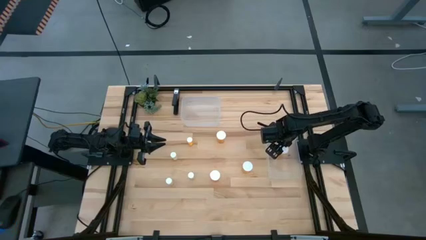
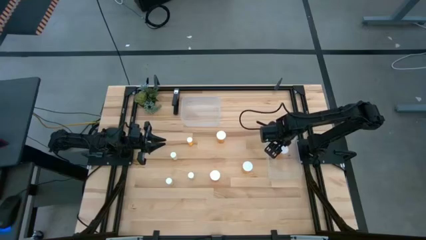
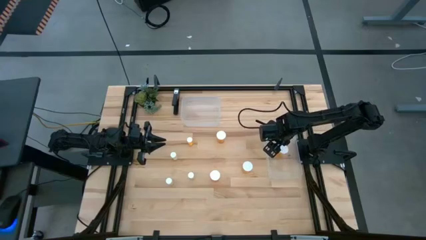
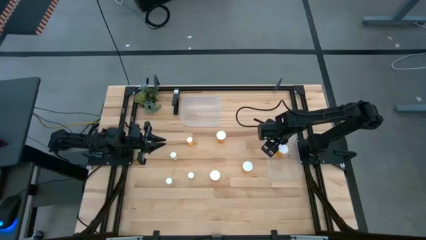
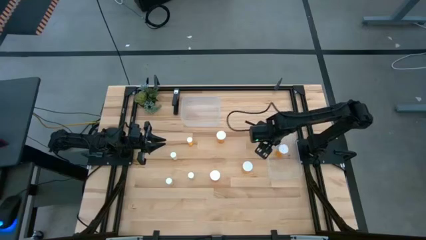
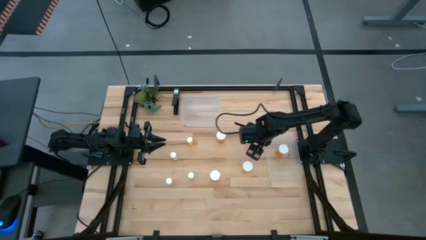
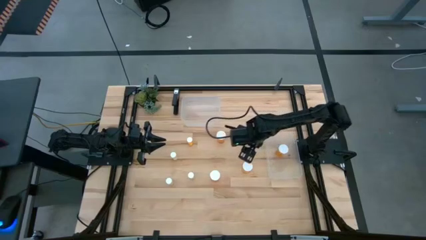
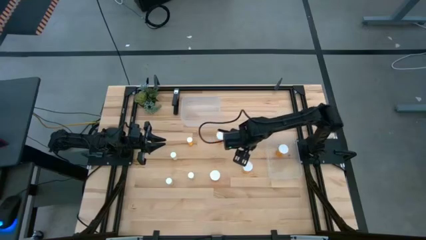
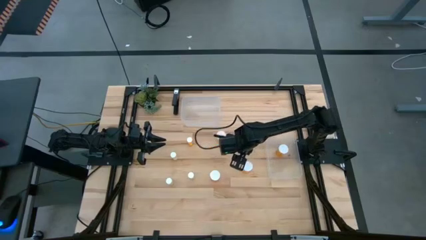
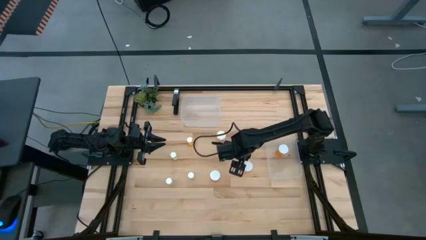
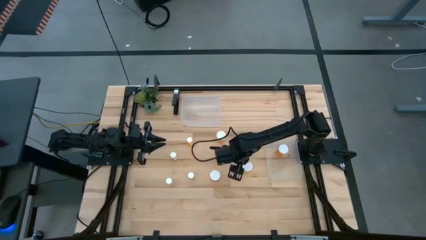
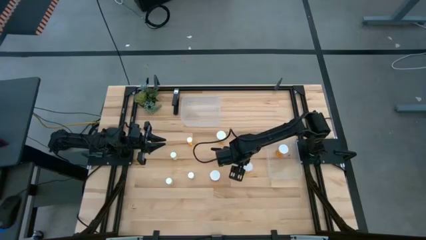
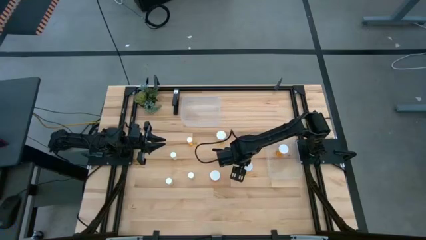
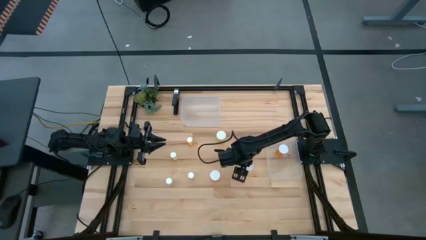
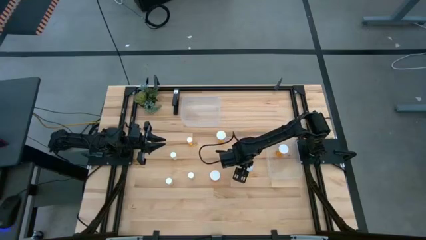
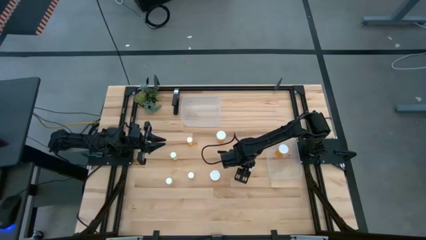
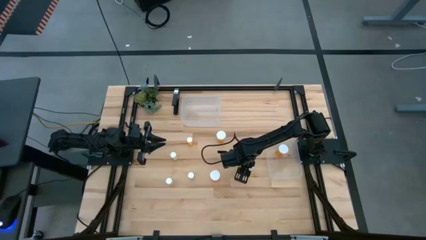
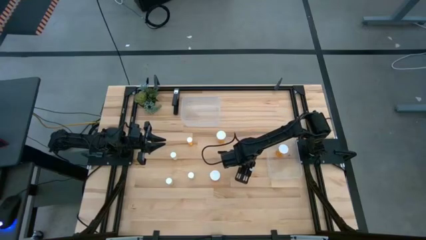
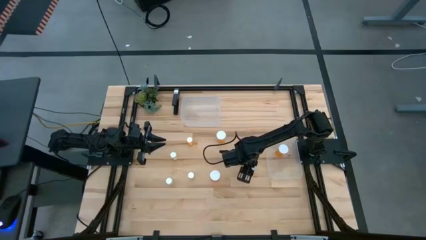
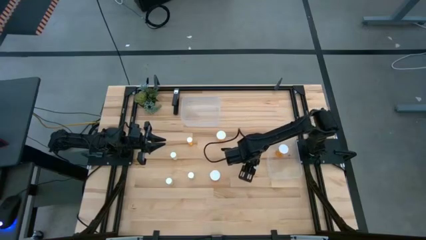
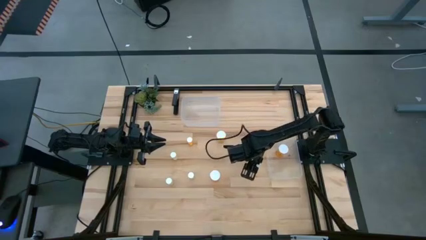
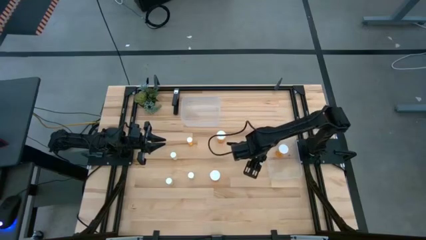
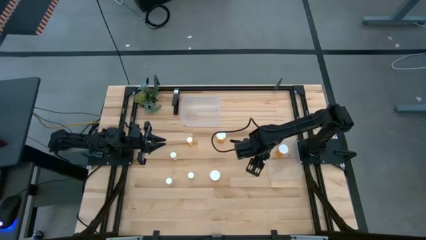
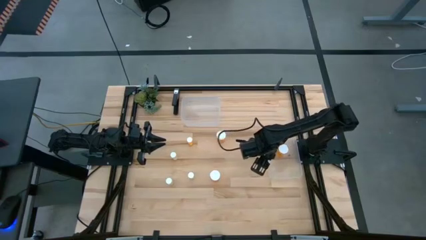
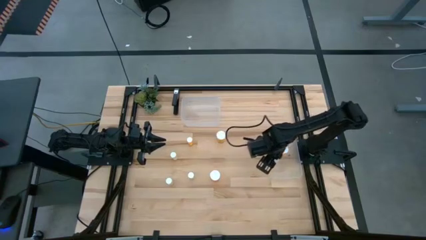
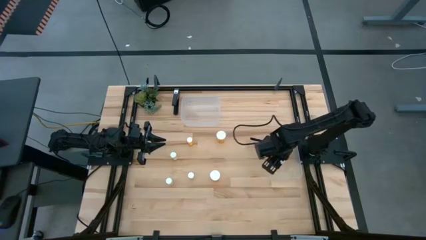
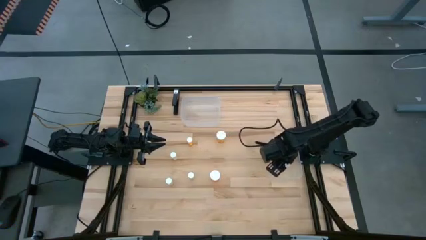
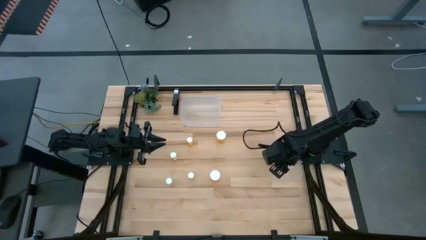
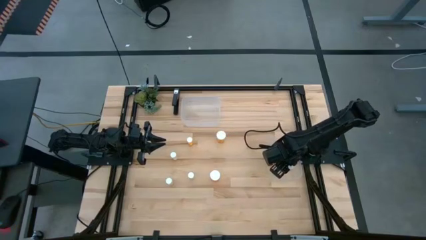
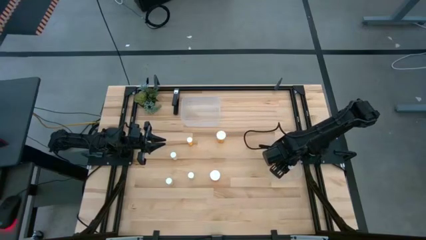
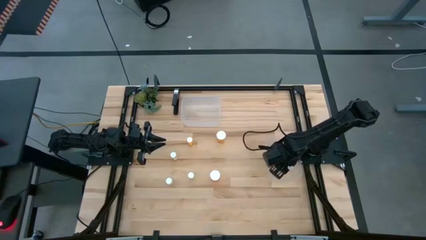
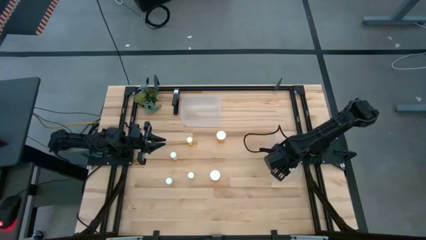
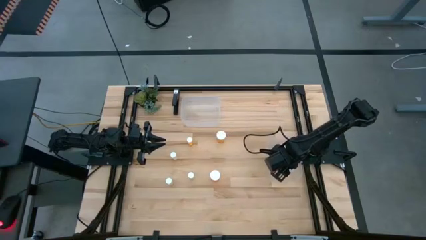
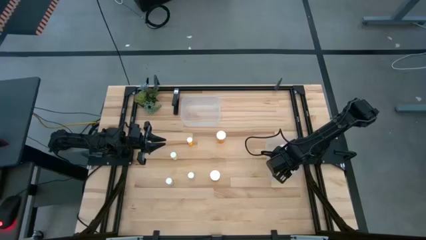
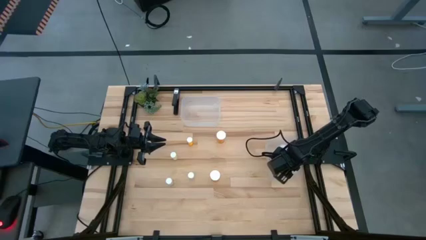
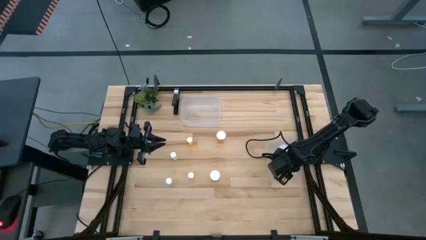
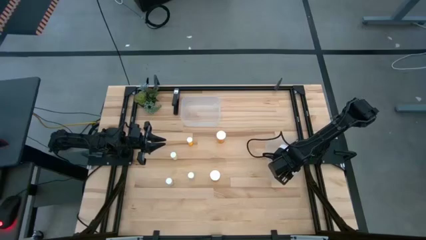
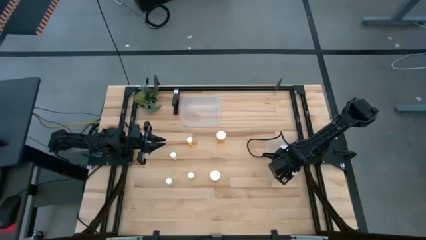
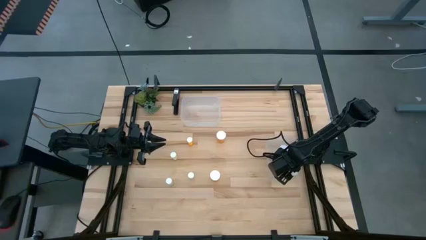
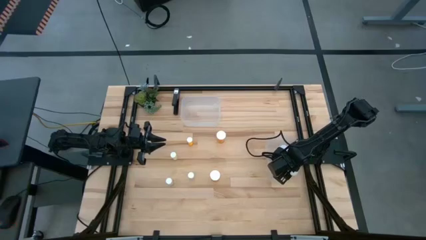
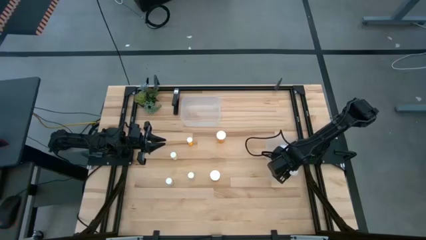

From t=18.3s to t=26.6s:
Task: Pick and place medicine bottles into bin by pill shape (circle, oval)
Put the large orange pill bottle into the bottom transparent bin

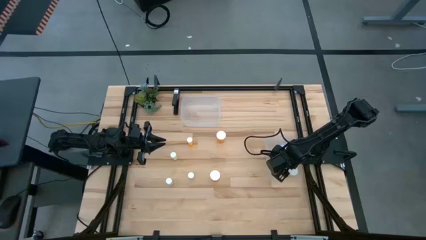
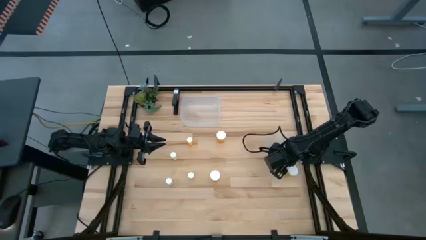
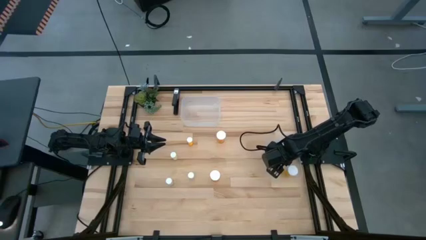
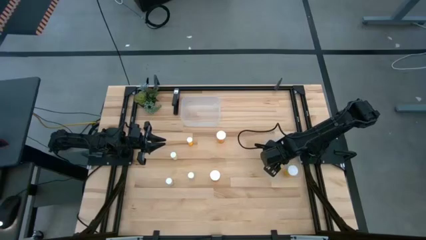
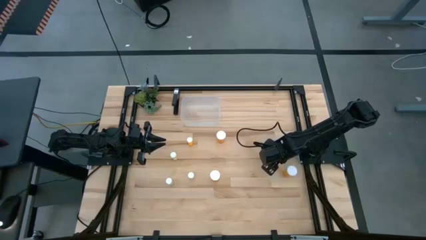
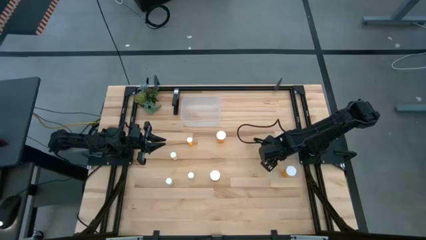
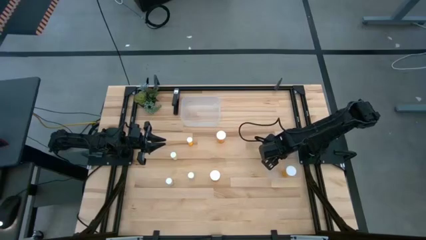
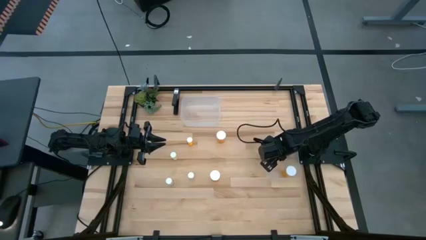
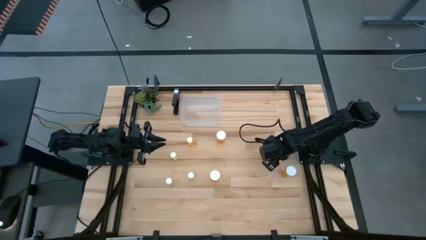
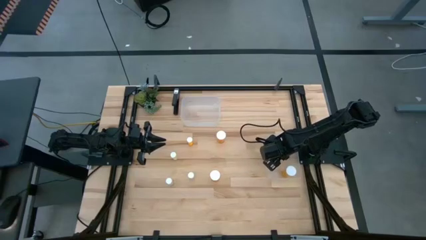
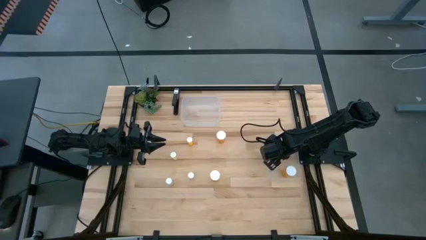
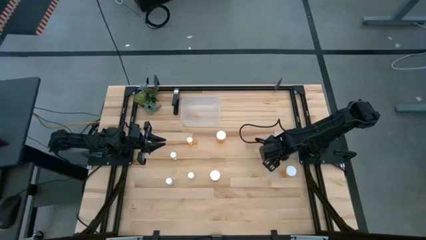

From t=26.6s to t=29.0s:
Adjust the large orange pill bottle in the bottom transparent bin

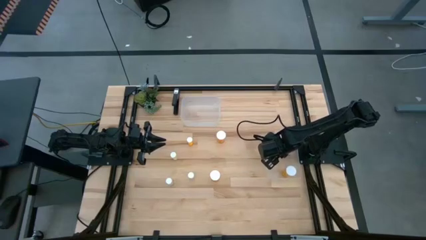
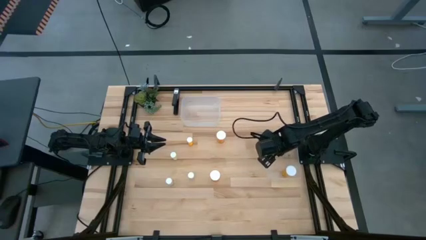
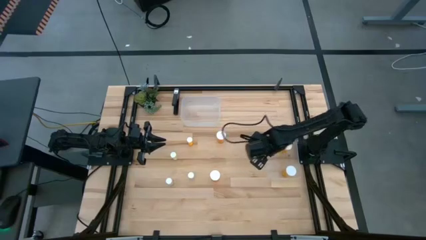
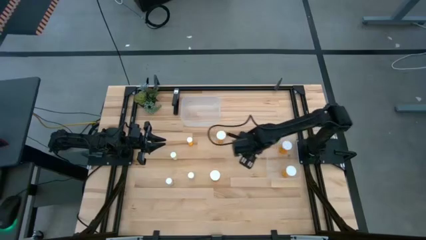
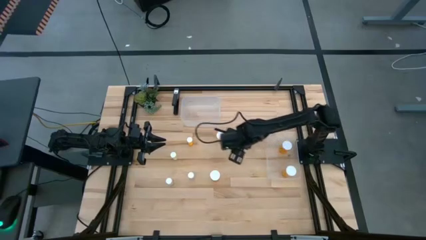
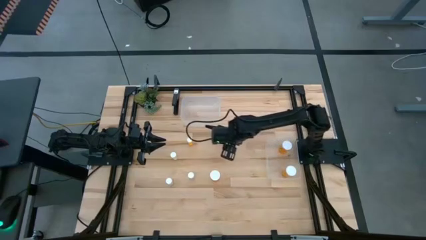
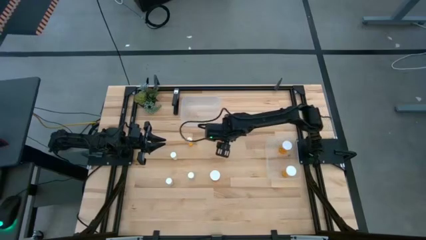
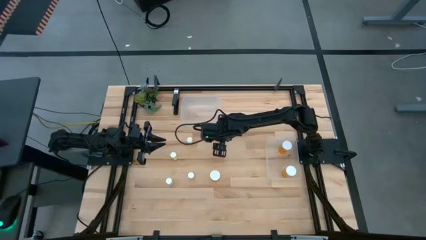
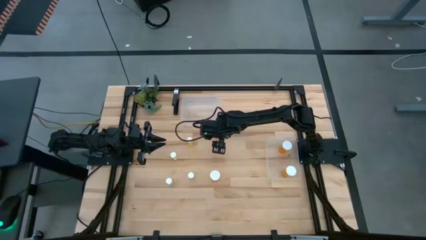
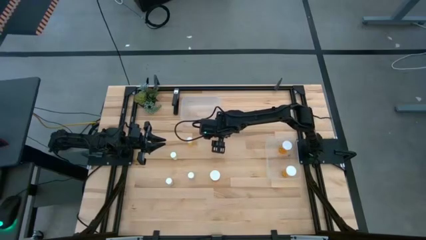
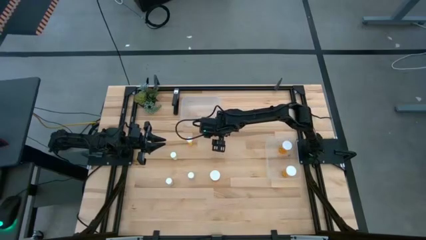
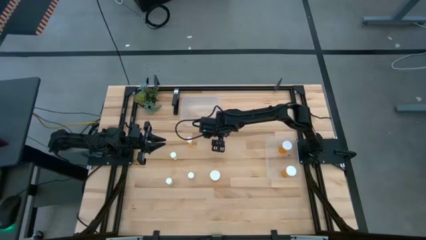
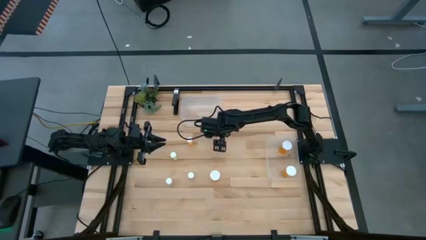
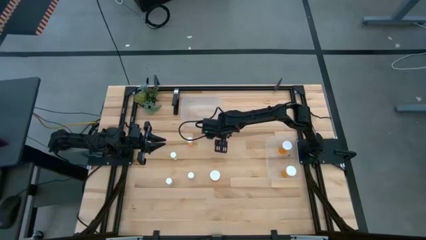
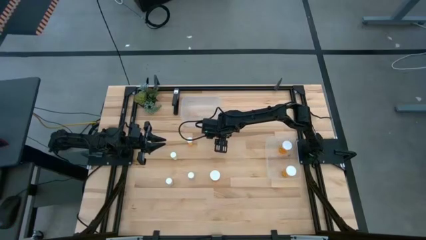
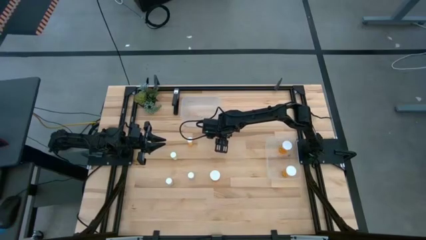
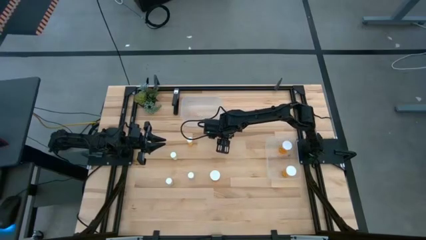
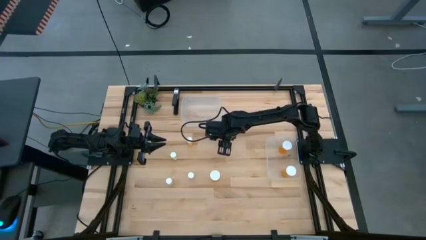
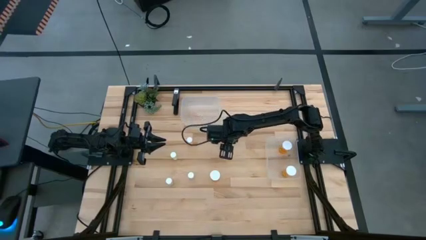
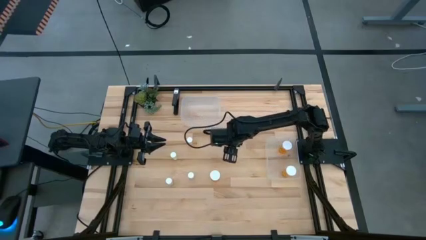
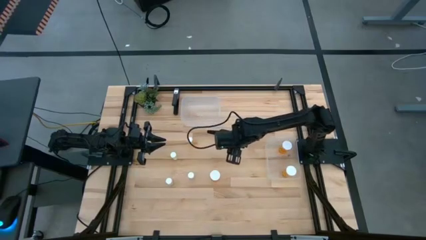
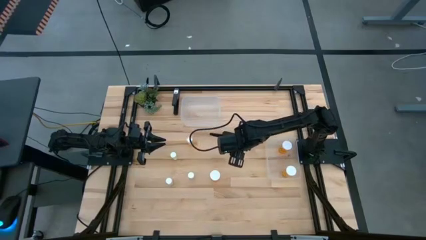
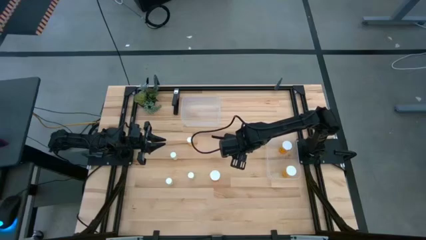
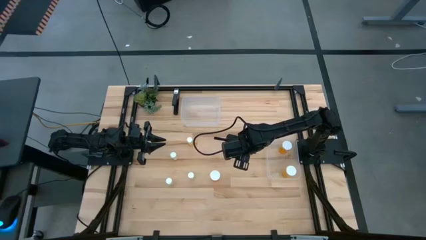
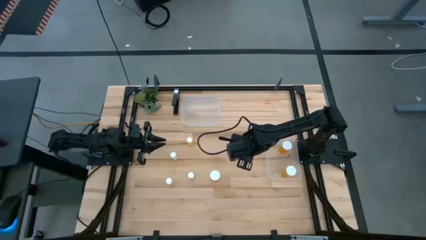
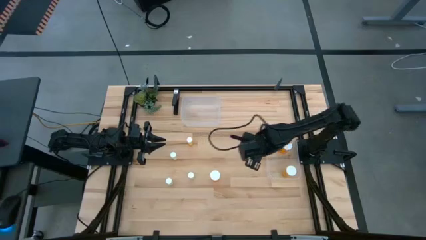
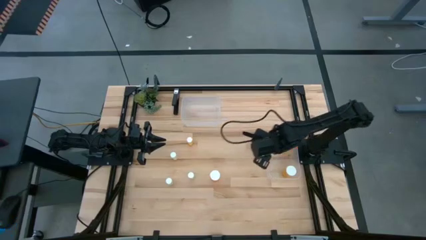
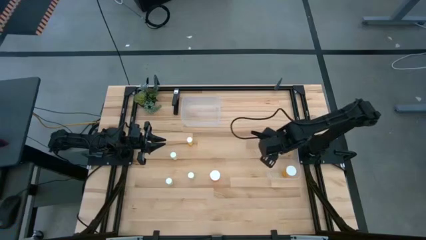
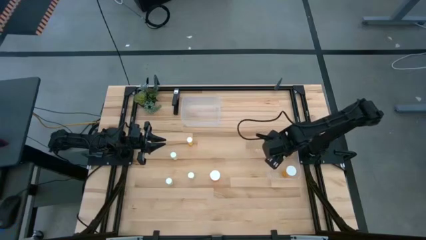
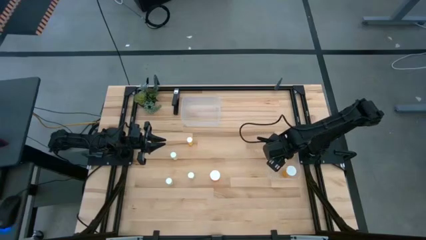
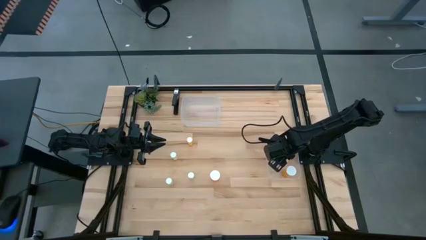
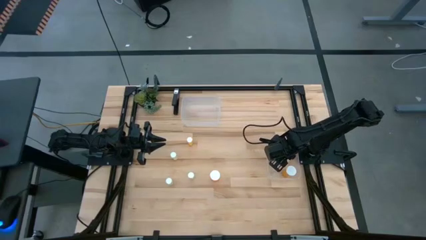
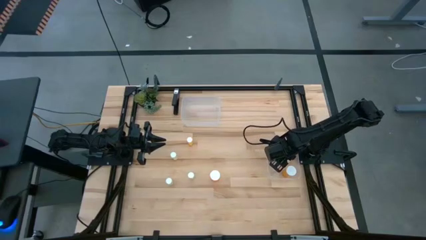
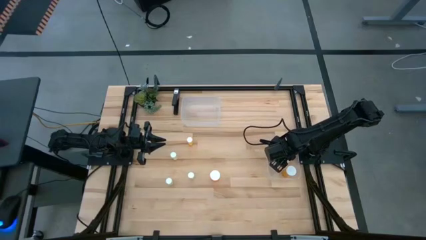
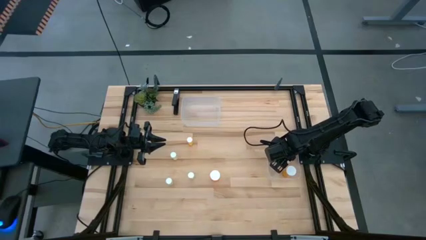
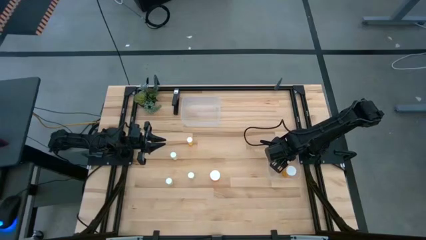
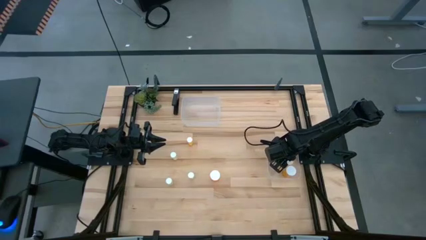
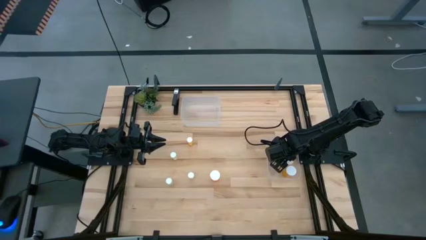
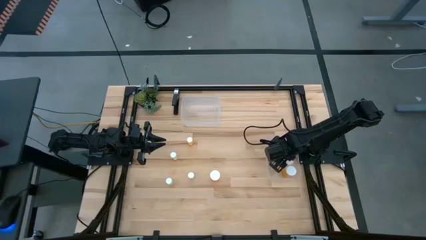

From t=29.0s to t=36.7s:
Put the large orange pill bottle into the bottom transparent bin
